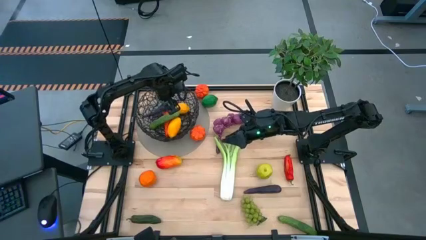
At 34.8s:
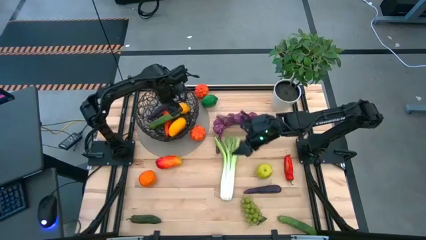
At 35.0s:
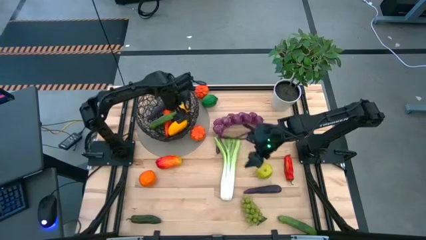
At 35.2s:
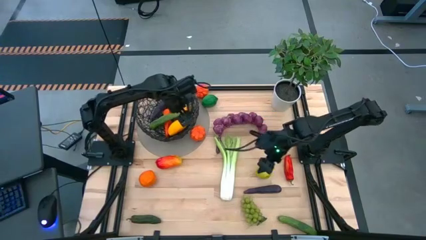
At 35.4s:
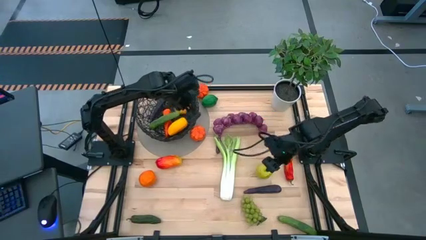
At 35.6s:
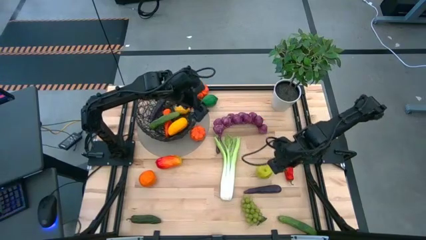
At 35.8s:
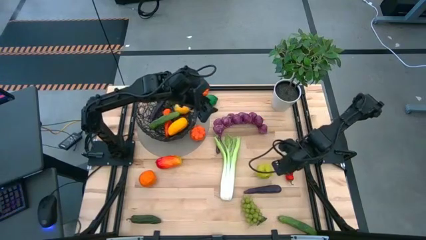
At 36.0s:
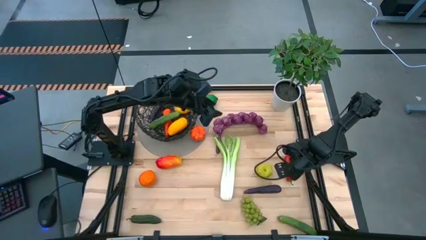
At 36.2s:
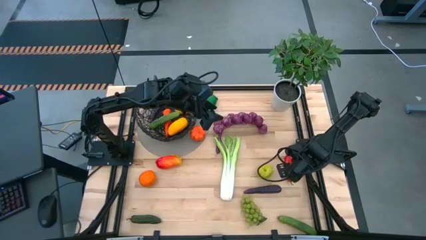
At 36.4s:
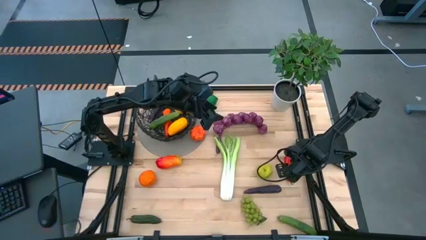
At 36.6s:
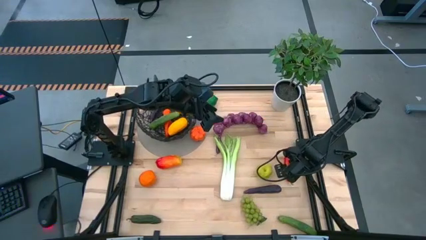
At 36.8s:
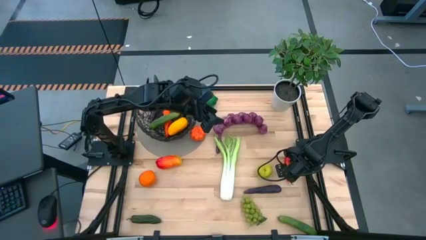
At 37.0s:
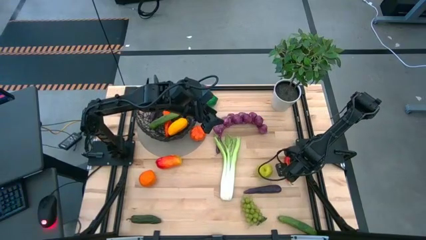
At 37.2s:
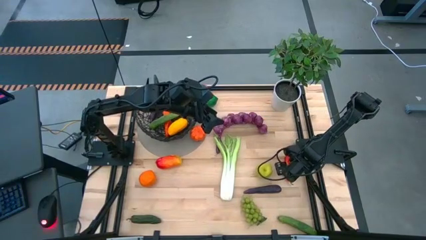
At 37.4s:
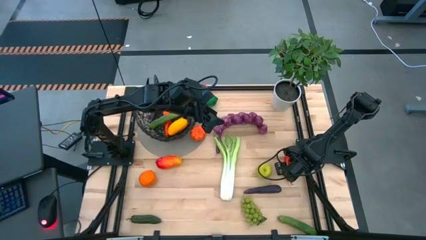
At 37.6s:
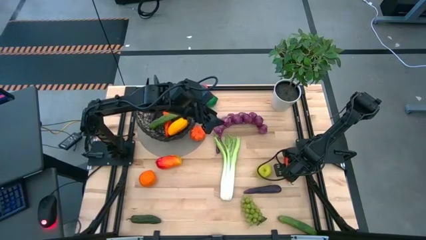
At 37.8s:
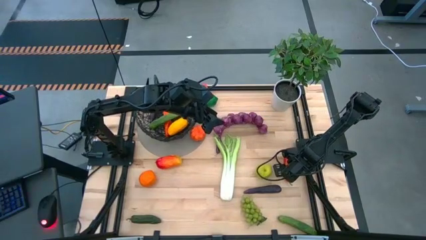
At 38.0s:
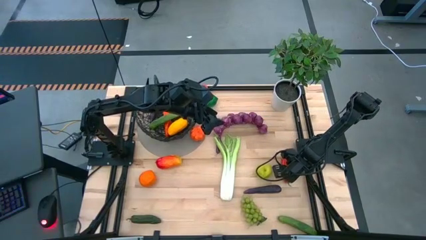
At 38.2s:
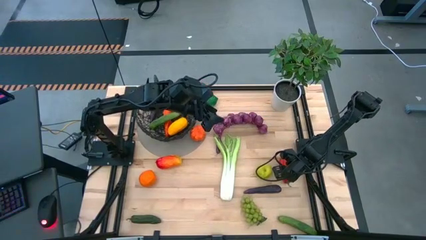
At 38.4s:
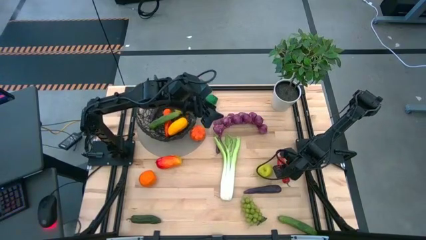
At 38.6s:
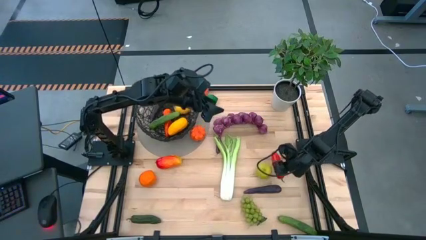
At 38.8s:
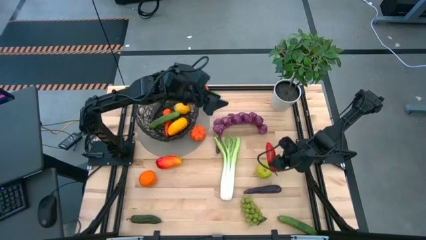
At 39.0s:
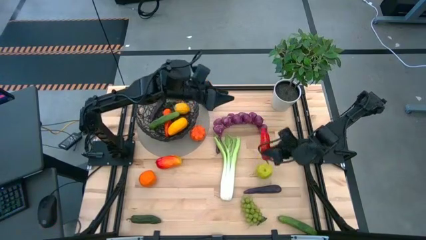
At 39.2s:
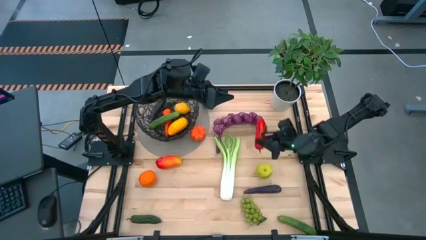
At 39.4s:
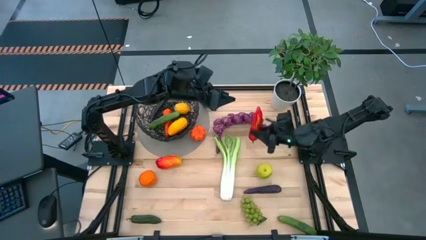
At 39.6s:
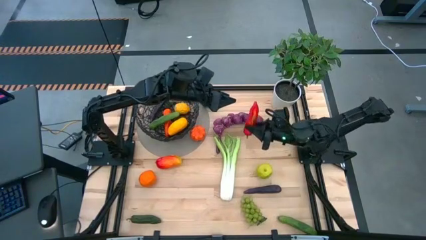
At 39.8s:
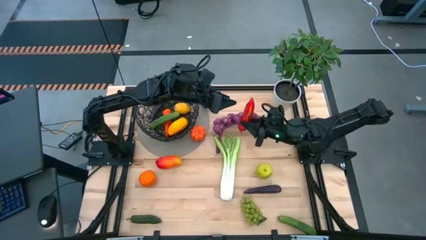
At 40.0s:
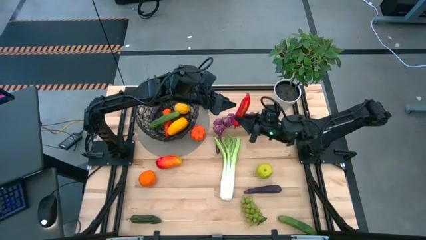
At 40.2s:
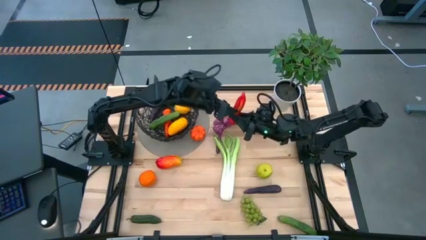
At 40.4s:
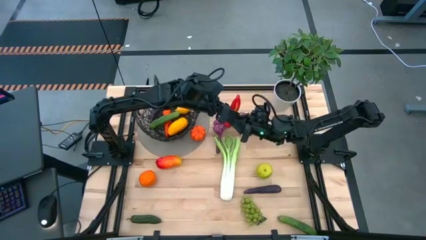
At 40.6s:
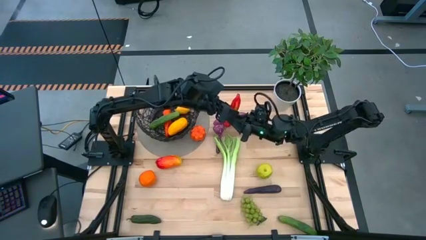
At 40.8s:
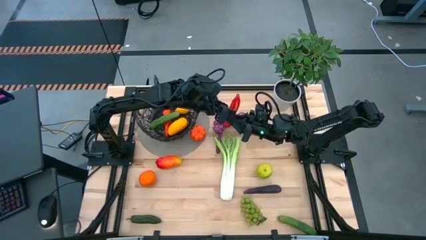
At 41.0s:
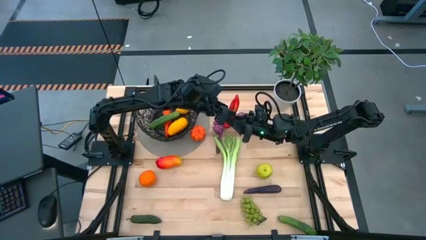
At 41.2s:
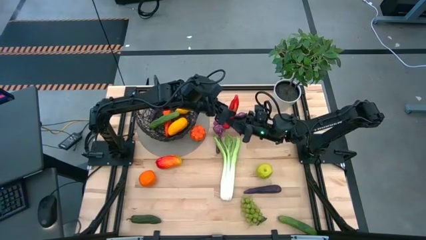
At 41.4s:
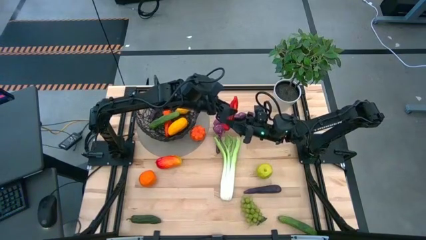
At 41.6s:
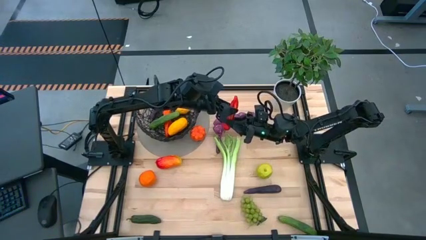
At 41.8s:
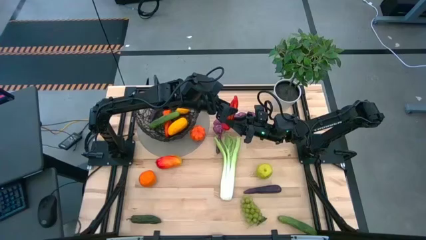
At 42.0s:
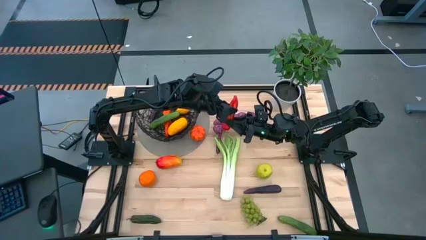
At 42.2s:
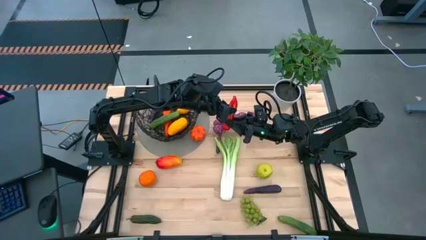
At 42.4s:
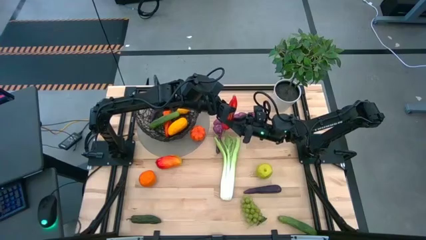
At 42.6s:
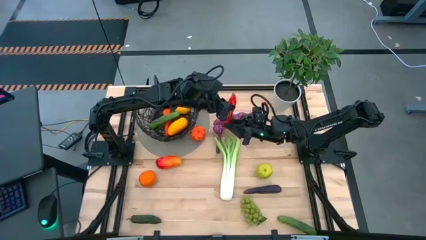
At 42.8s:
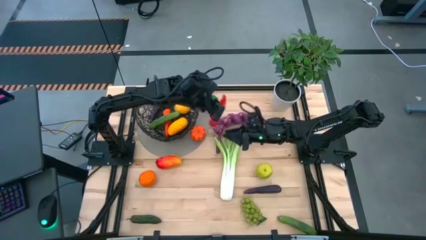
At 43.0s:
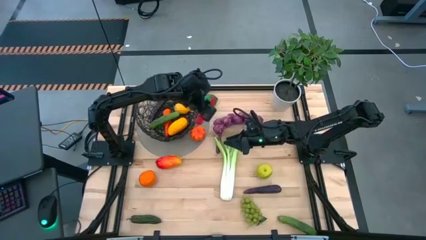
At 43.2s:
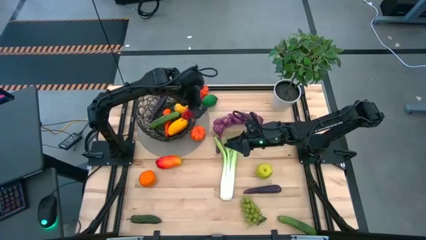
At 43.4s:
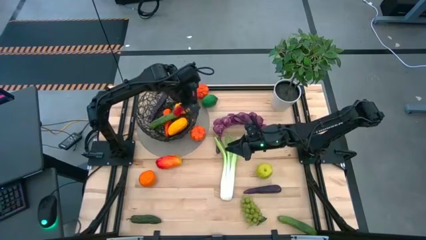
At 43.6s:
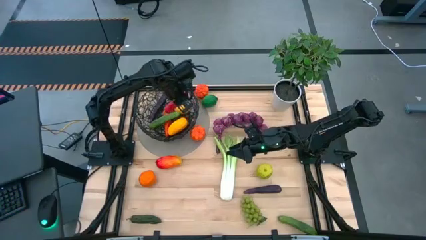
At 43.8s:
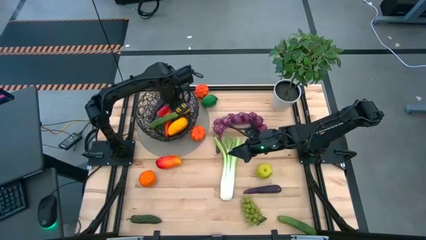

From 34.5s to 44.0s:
Task: Build produce basket
Put the red chili pepper into the wire basket

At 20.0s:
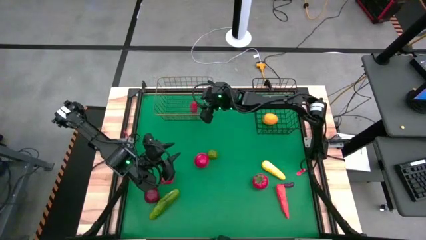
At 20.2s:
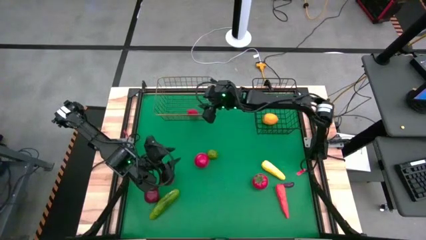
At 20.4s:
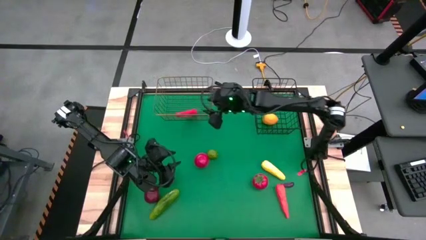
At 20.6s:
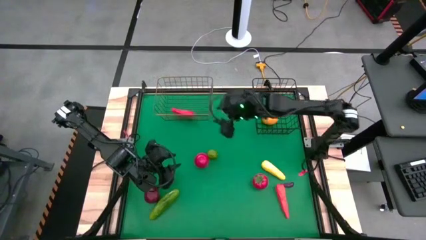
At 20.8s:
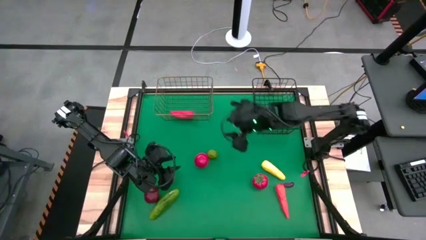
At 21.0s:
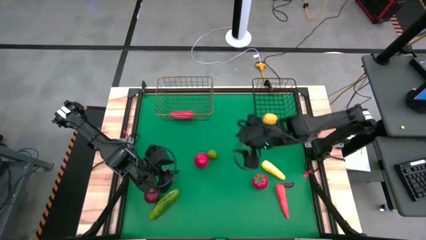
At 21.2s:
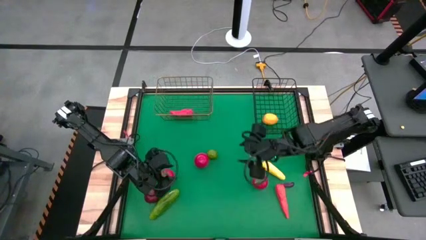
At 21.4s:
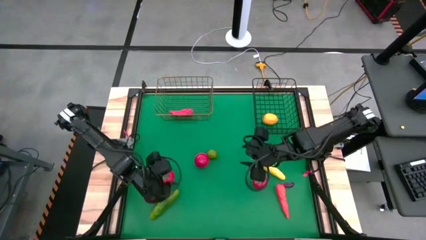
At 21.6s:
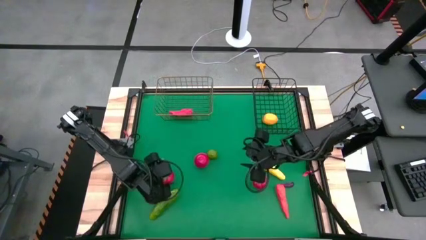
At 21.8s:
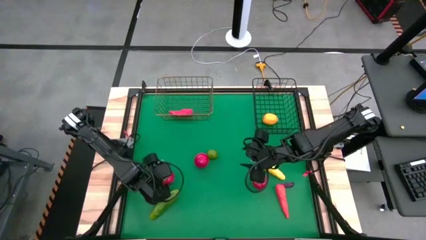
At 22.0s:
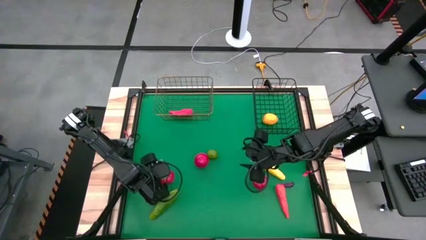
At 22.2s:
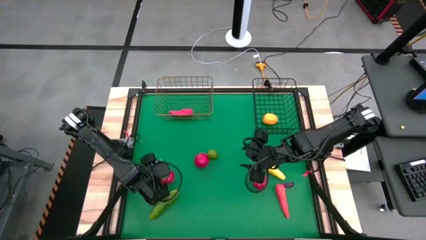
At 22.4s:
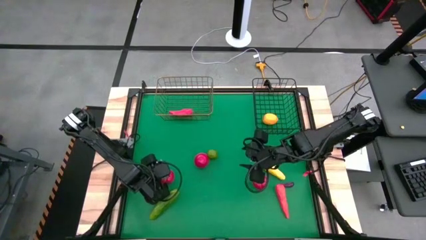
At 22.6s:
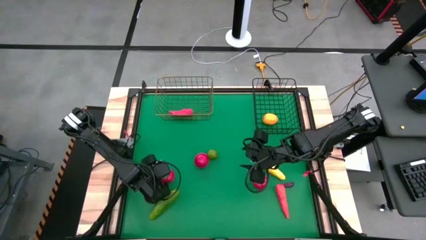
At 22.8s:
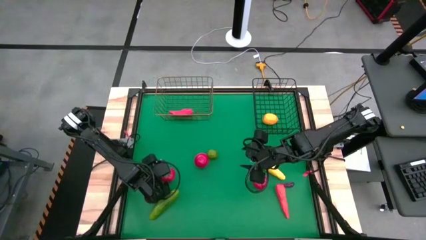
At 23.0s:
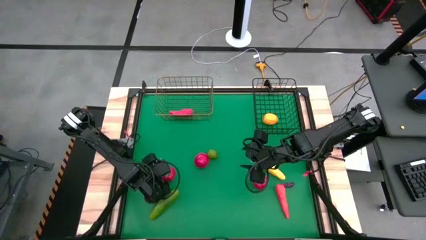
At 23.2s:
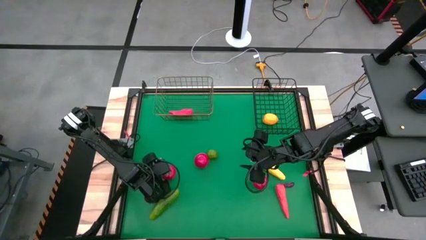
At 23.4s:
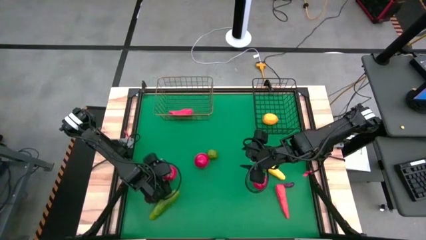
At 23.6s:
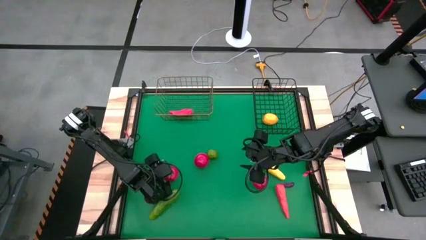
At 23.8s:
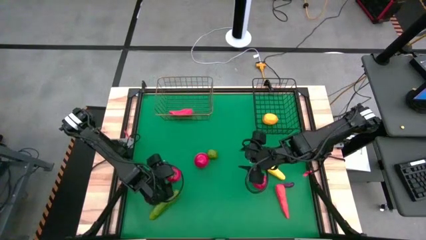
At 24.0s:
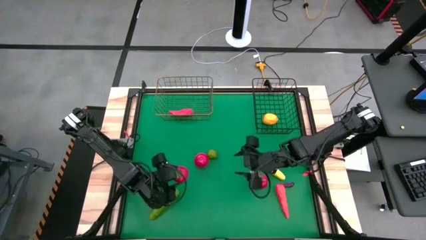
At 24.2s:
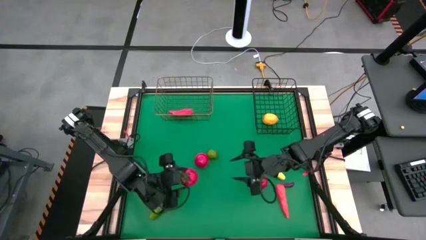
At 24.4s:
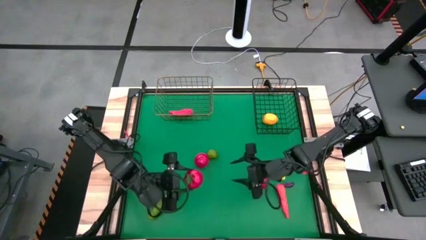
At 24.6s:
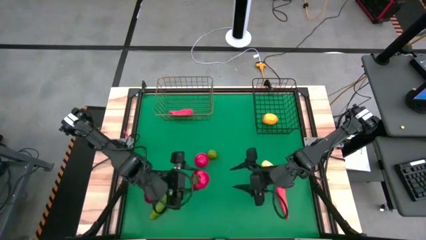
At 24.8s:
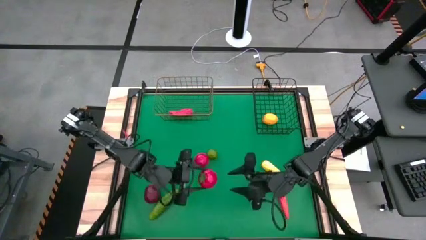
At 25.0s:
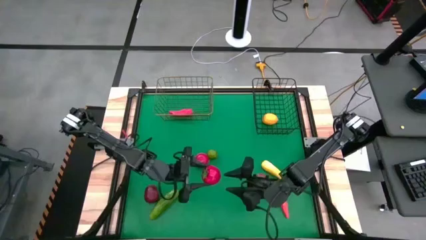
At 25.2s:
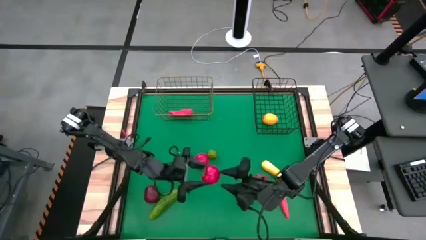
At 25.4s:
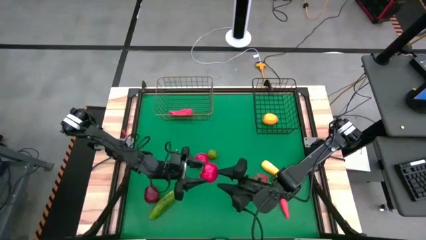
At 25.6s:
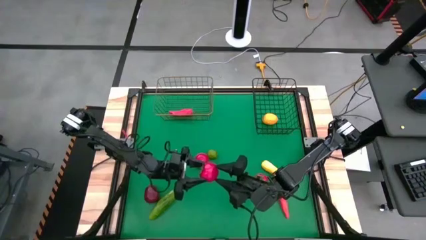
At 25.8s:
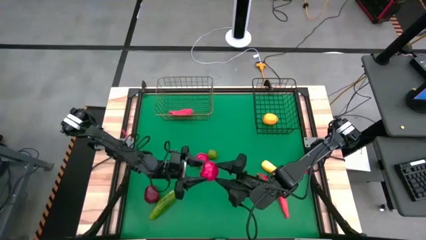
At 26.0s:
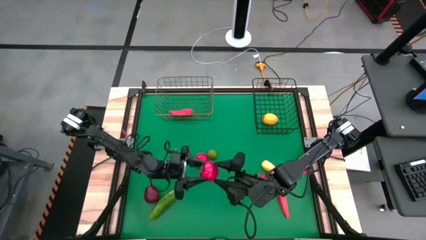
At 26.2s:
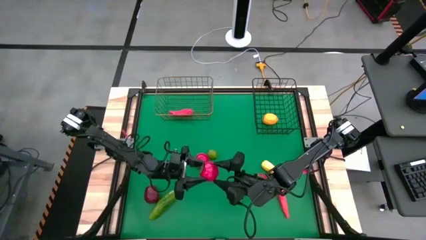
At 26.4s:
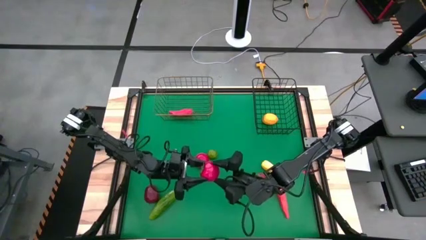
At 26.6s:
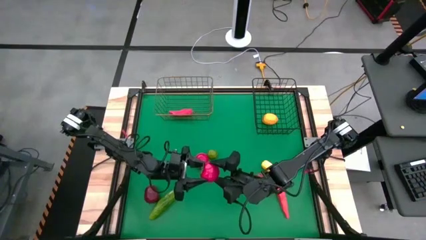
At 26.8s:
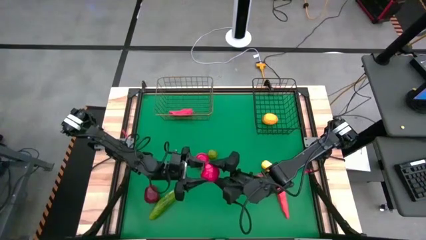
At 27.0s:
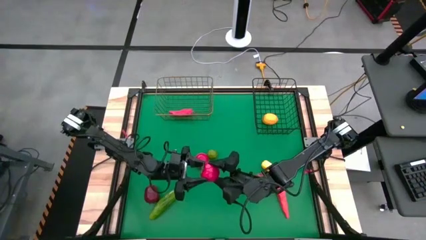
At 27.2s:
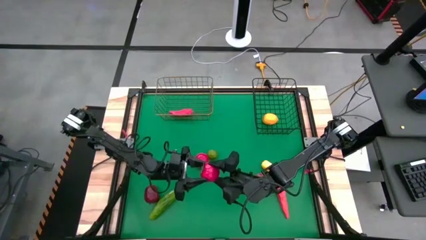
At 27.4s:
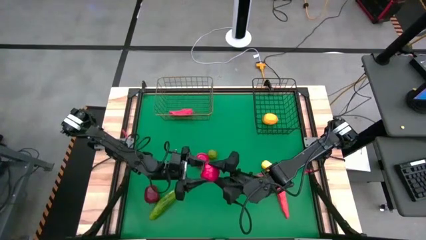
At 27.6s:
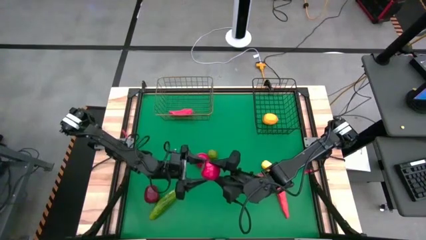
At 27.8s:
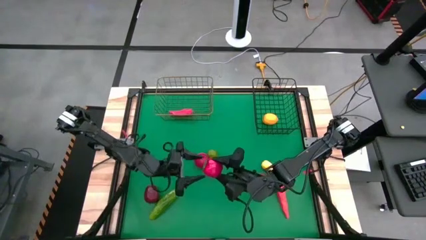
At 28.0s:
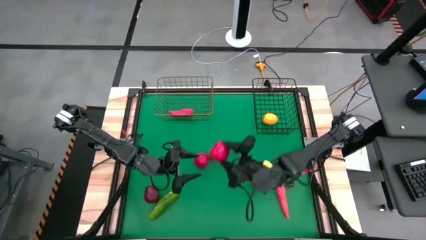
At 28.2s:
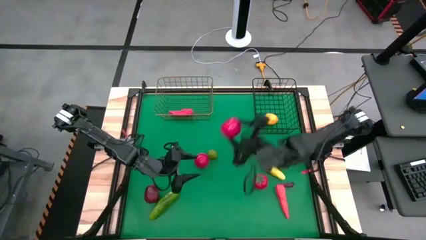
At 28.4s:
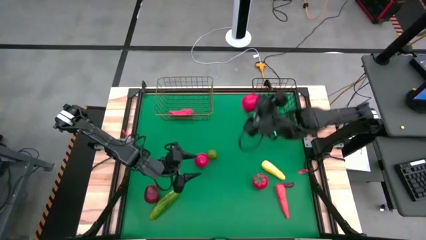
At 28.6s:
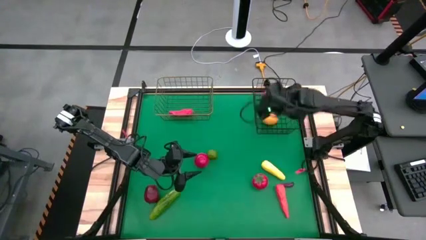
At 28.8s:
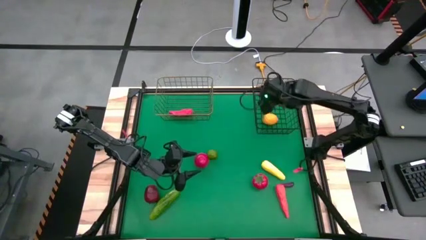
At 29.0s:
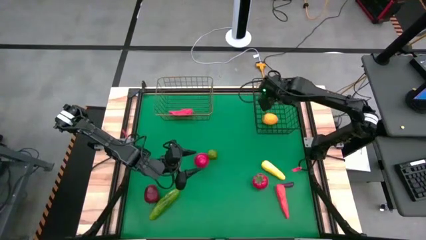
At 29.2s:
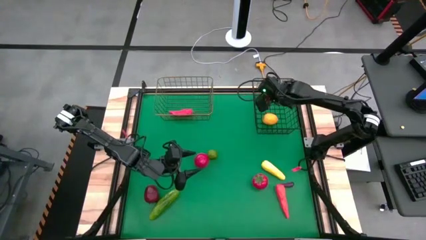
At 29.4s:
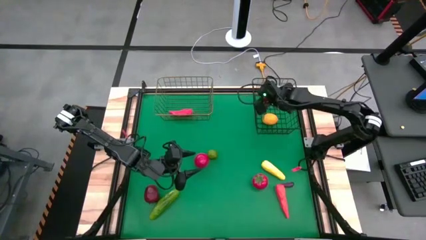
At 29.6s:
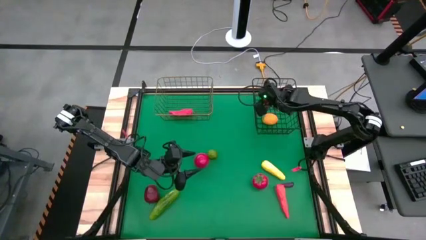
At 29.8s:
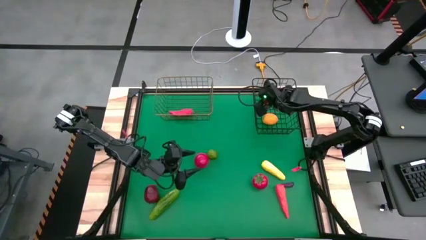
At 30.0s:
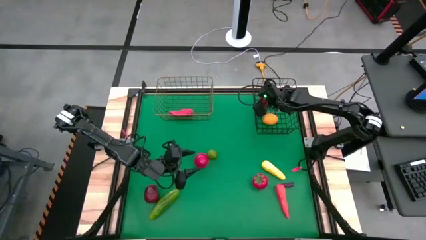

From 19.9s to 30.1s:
Task: Sort produce into baskets
Put the left tomato into the black wire basket
